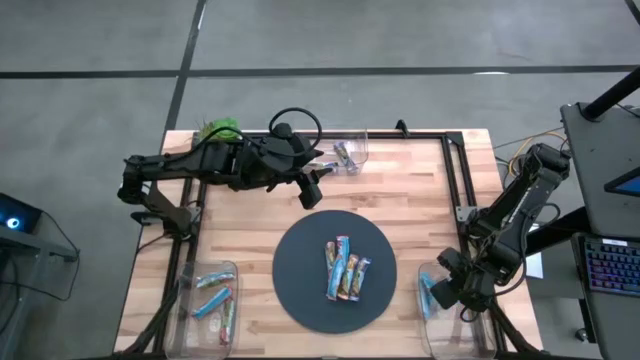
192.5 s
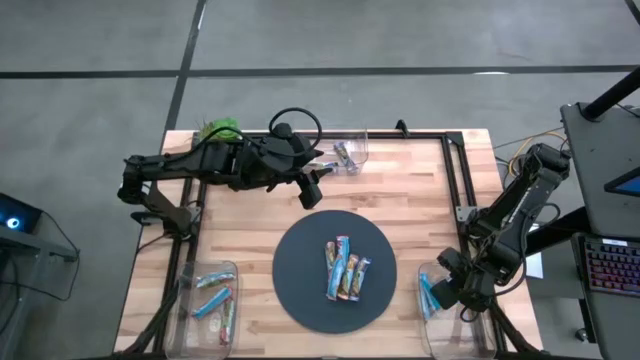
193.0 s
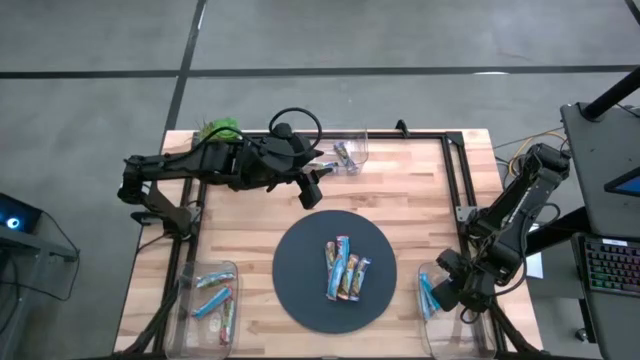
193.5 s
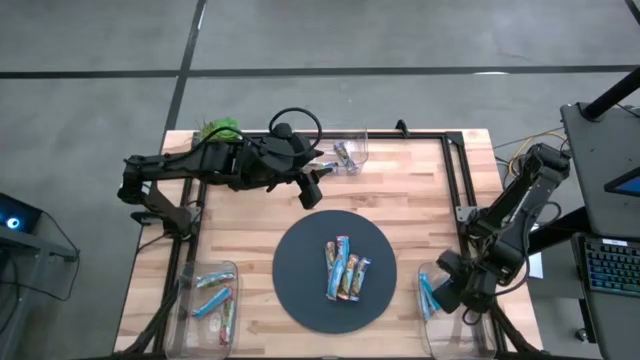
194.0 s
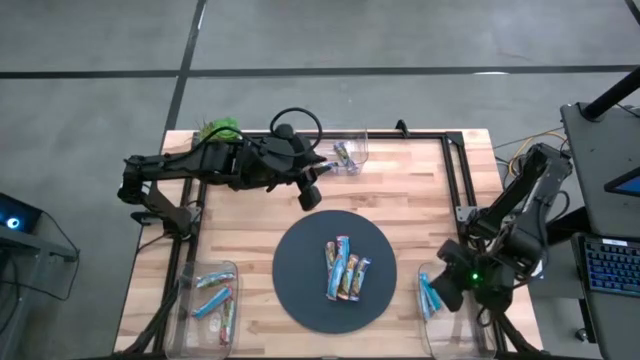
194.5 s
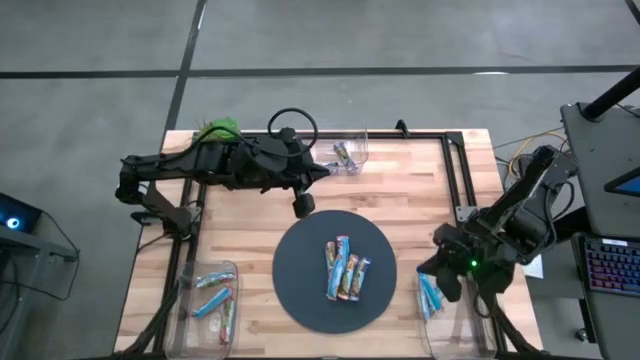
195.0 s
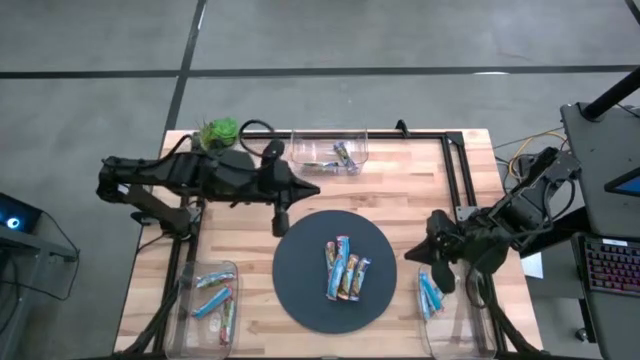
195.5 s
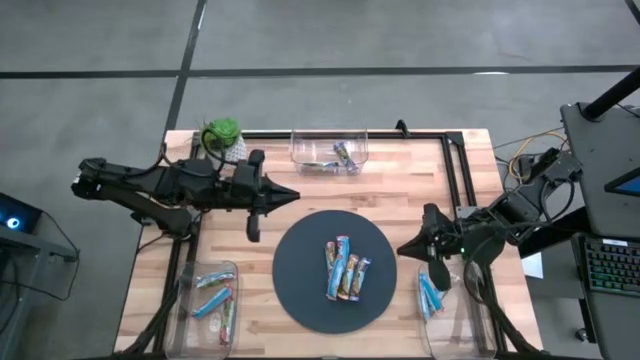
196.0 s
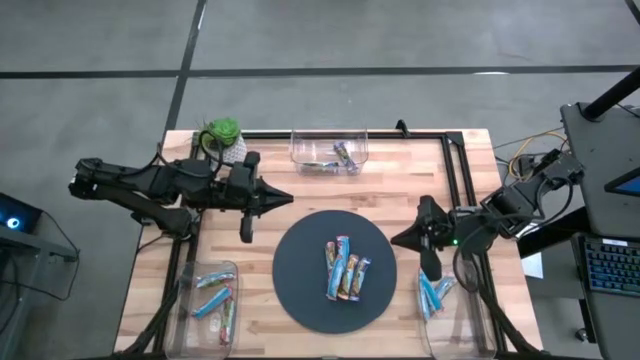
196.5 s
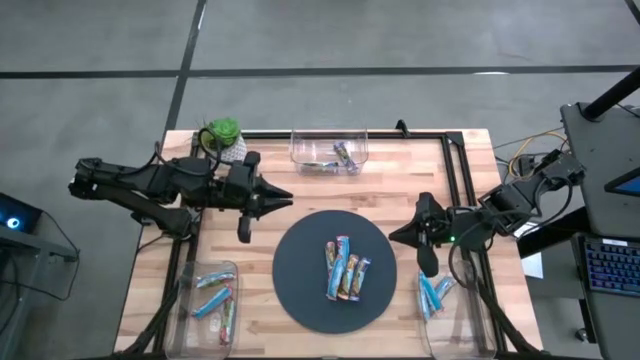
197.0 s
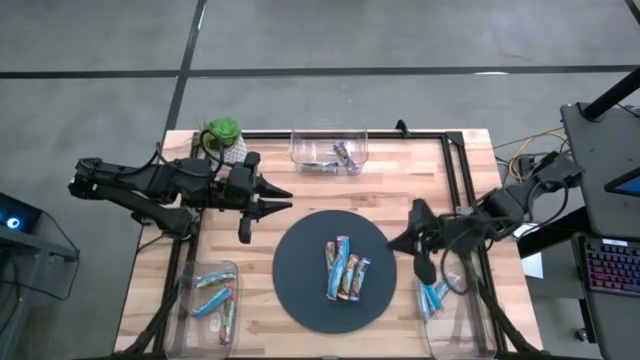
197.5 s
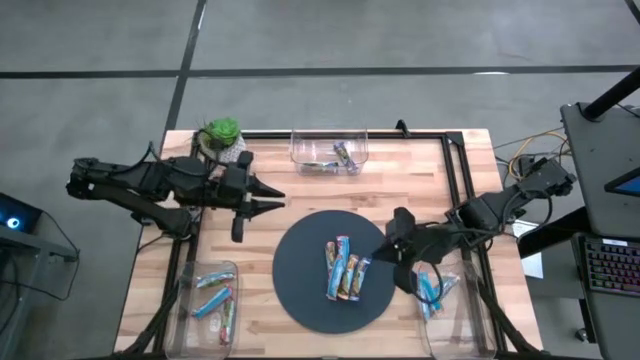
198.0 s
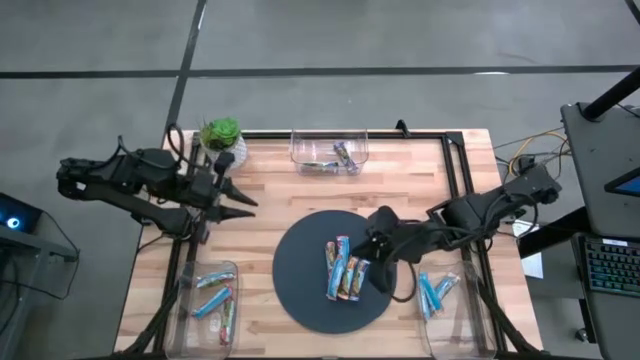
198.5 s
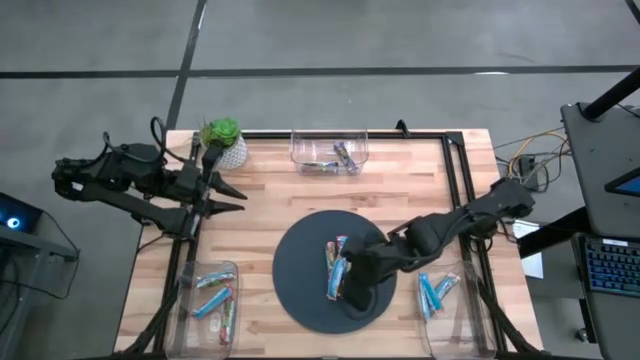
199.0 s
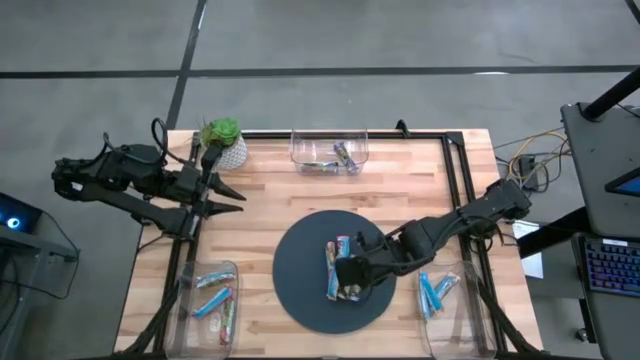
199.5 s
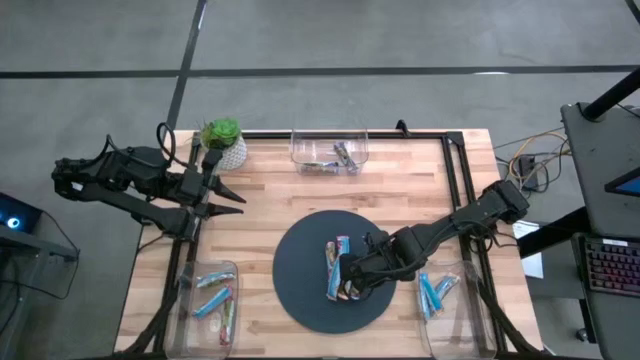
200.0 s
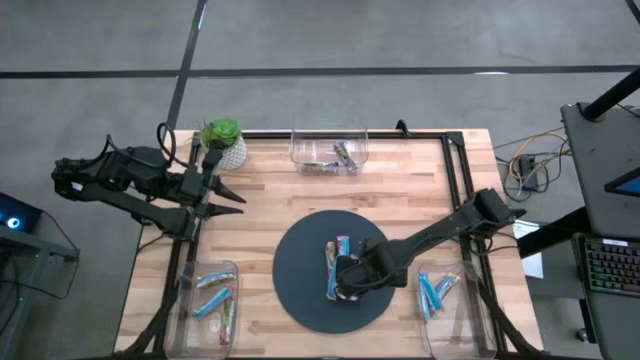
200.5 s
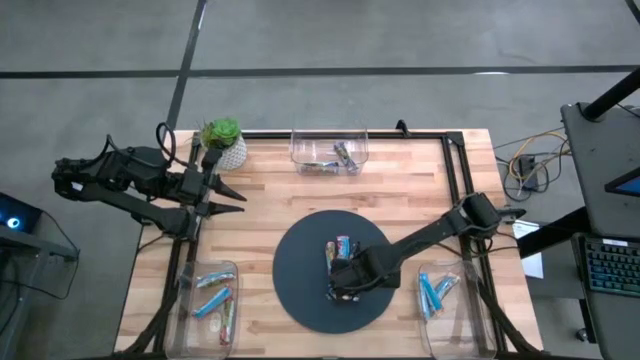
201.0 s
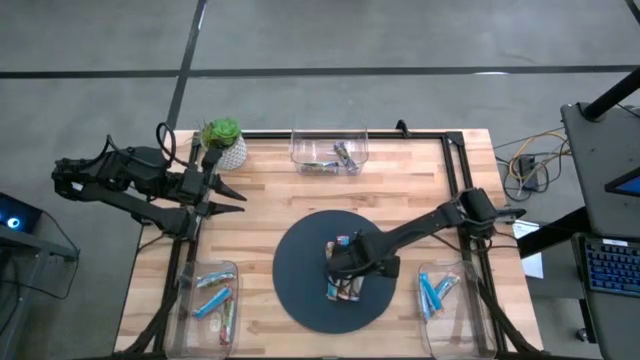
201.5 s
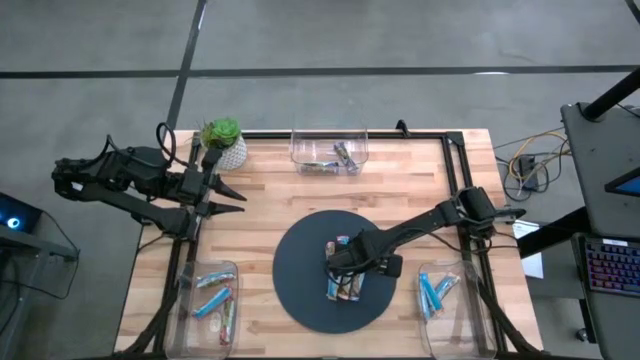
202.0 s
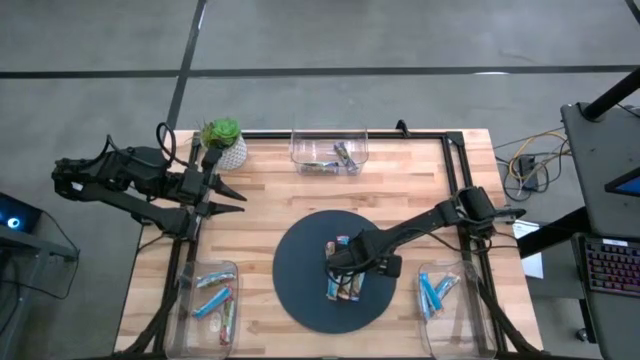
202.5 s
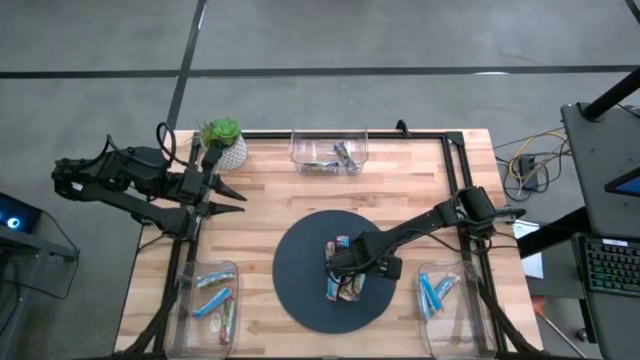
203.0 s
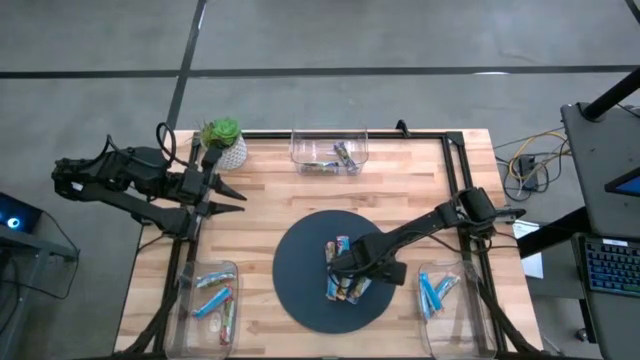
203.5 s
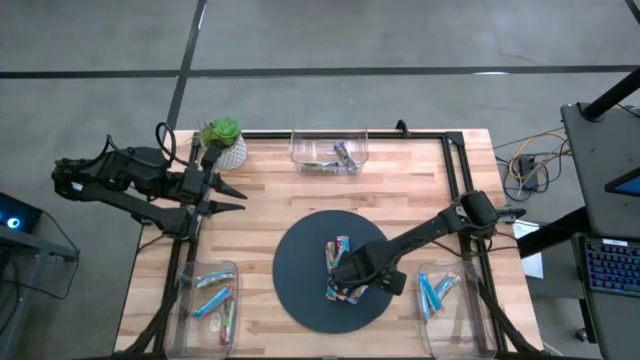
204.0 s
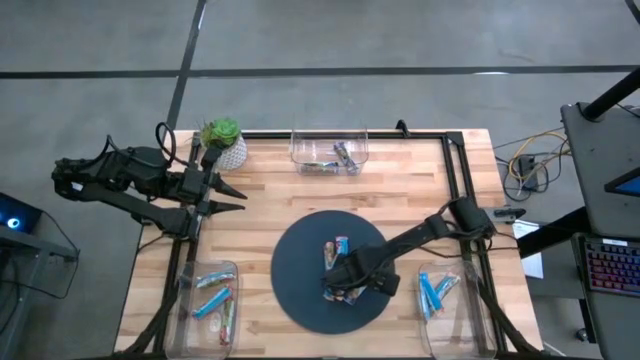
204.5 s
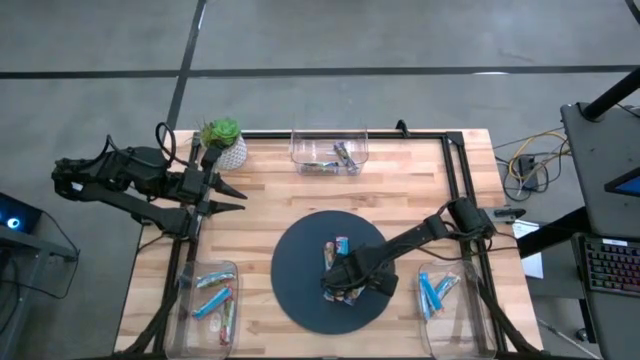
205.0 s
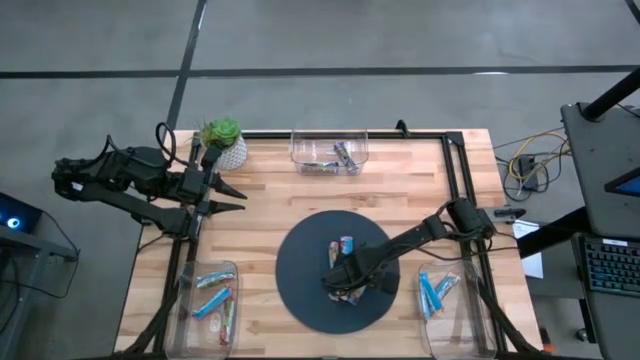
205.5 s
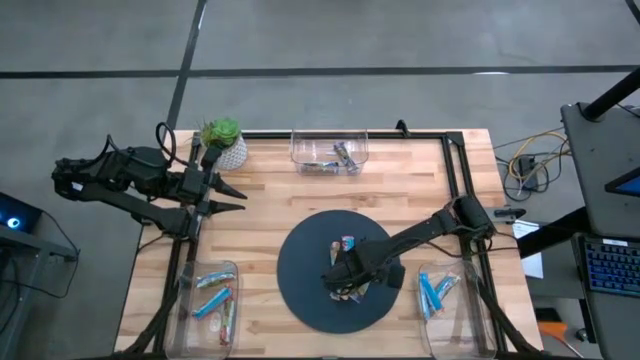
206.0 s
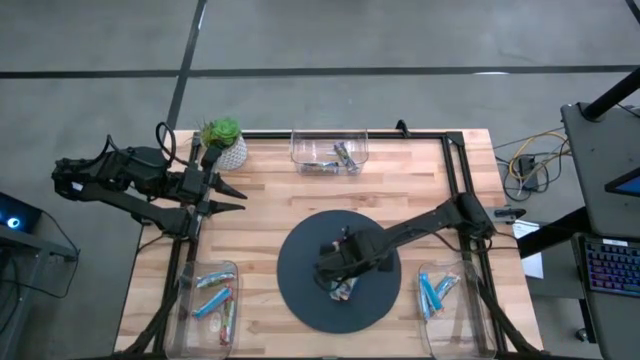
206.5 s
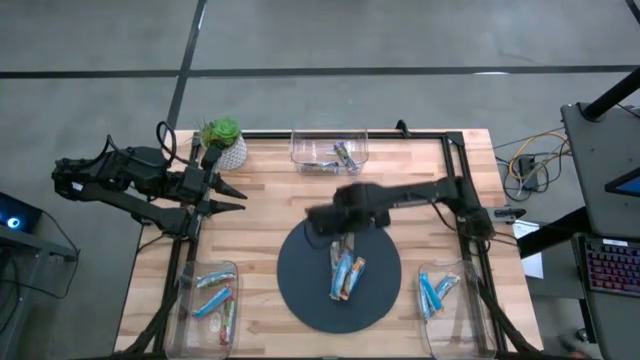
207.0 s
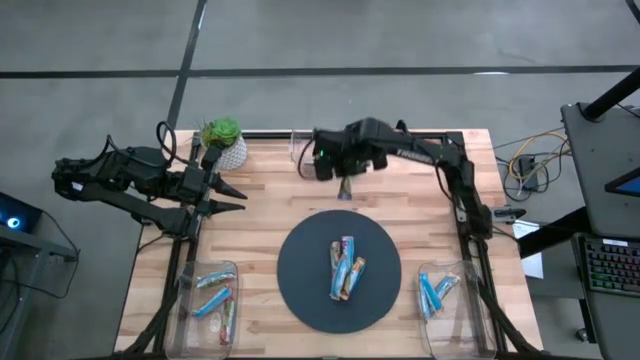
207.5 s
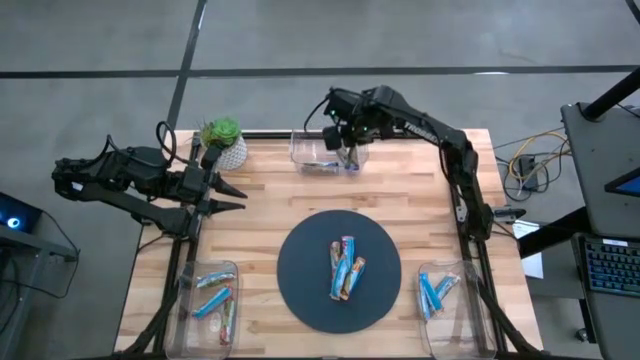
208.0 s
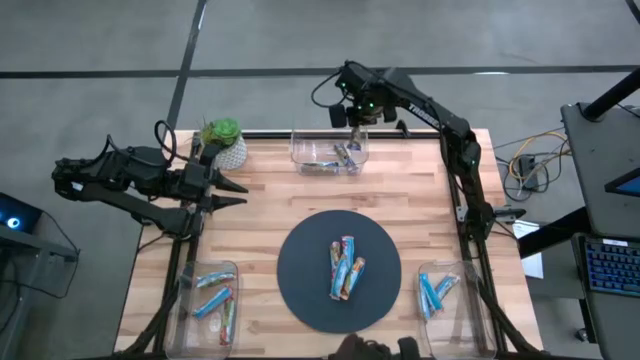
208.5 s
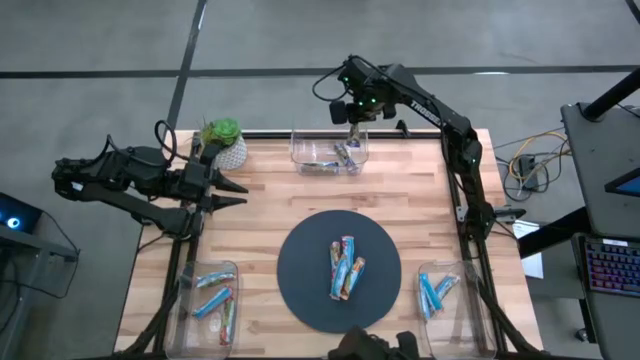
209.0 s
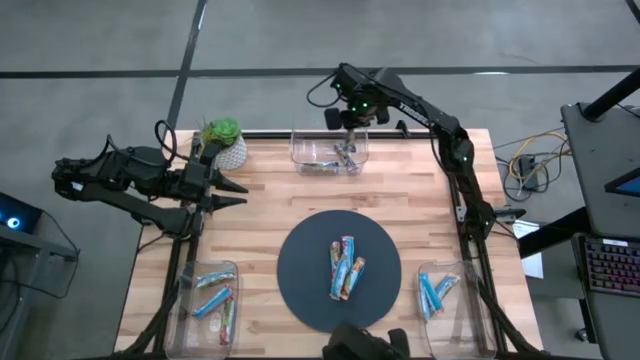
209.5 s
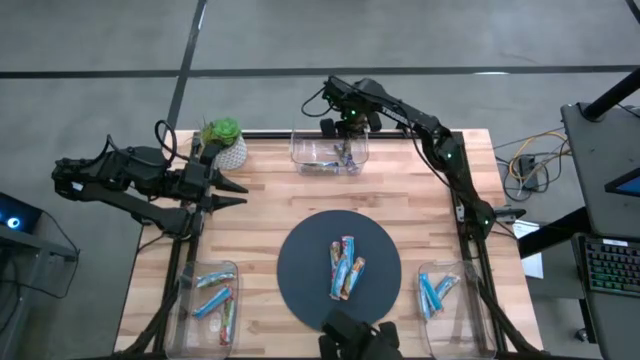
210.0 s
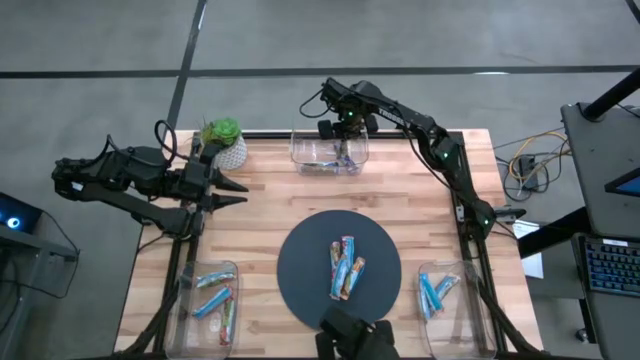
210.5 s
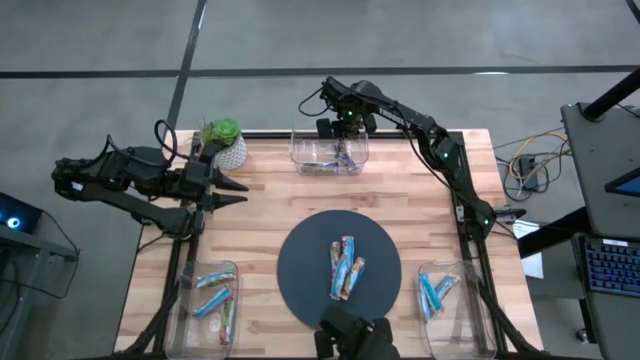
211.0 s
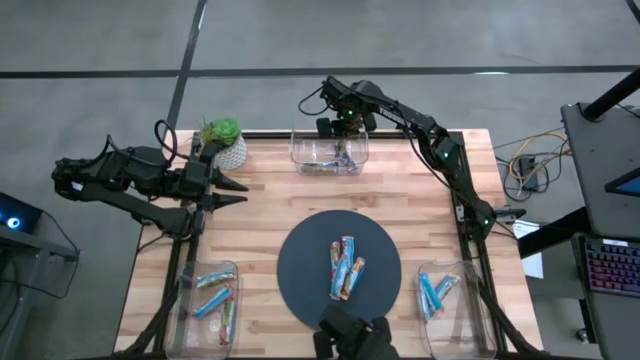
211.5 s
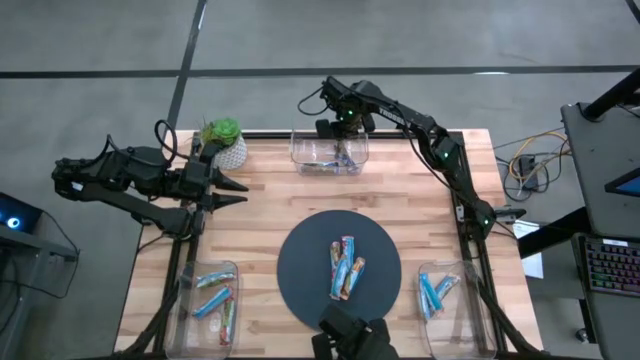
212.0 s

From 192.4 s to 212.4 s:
Task: Pick and place Granola Bars by type
Put the blue granola bar into the top transparent bin

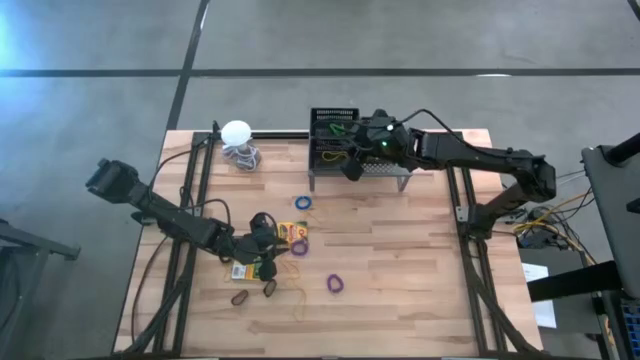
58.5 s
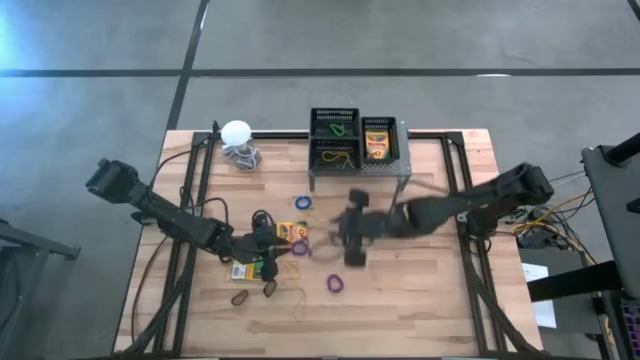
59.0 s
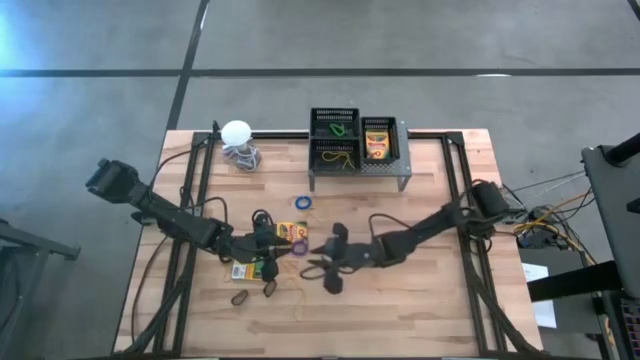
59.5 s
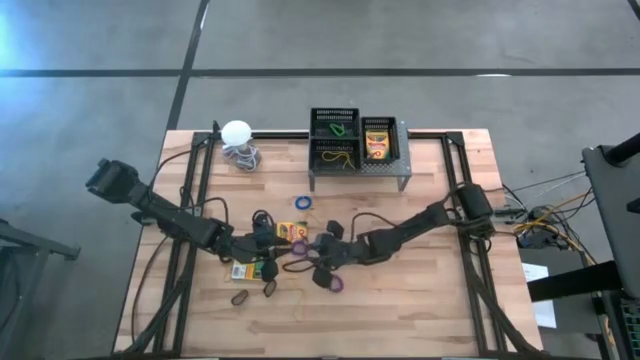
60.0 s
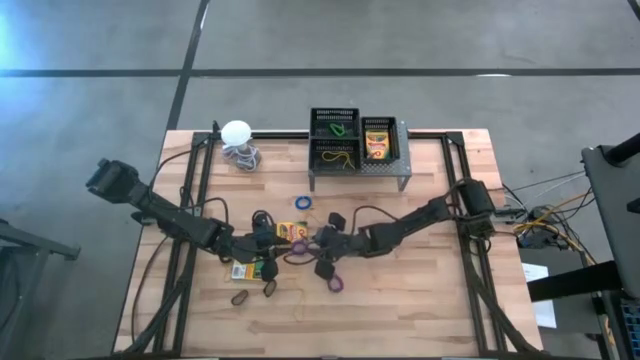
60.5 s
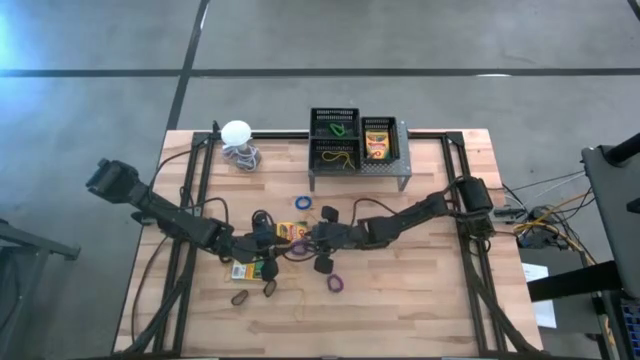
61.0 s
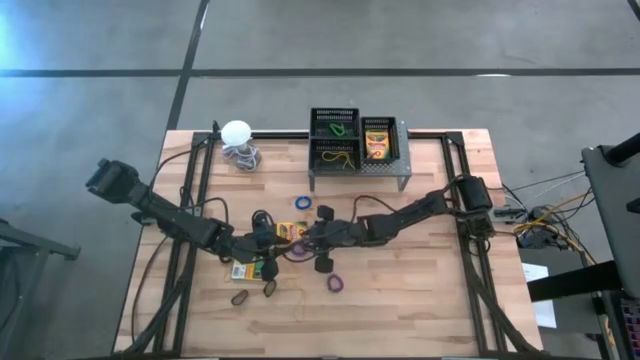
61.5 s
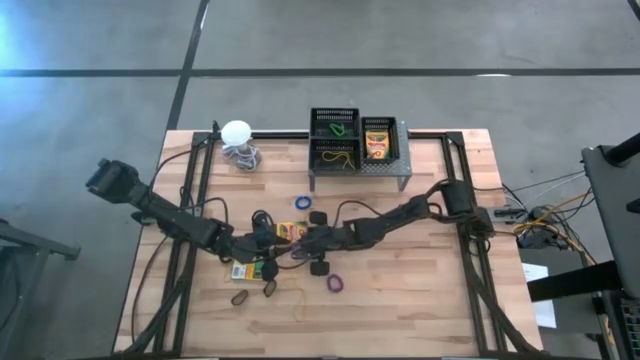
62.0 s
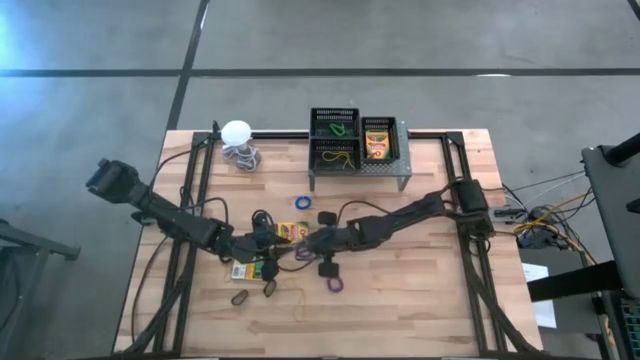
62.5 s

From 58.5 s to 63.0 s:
Task: Pick & Place Office Desk Supplies
Put the purple spring keychain into the top left black bin
